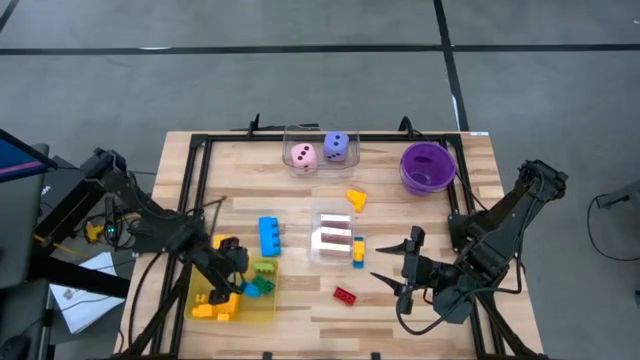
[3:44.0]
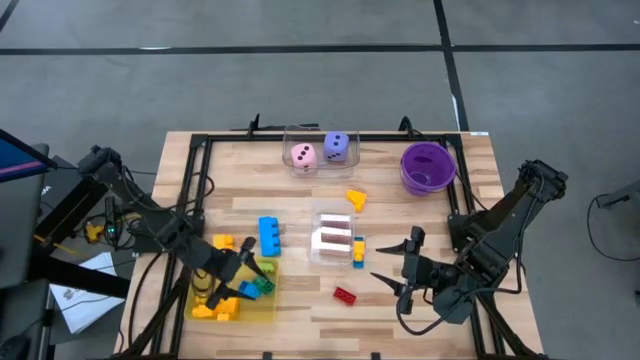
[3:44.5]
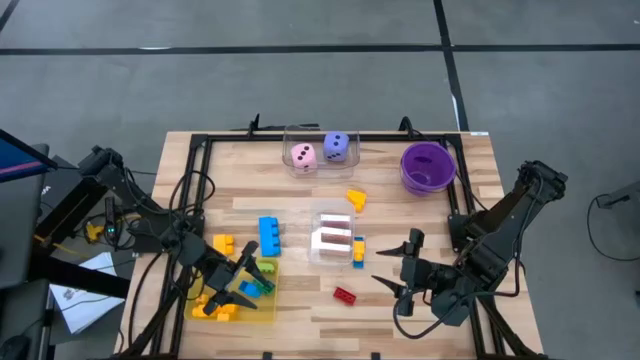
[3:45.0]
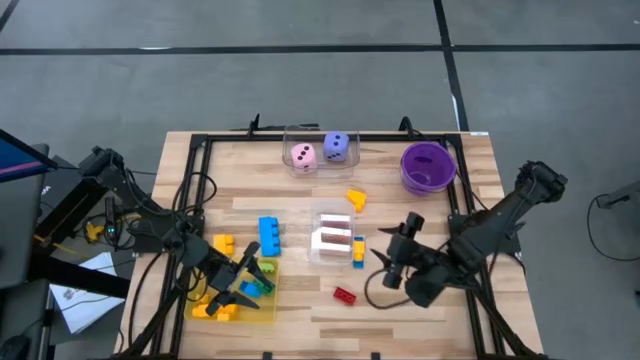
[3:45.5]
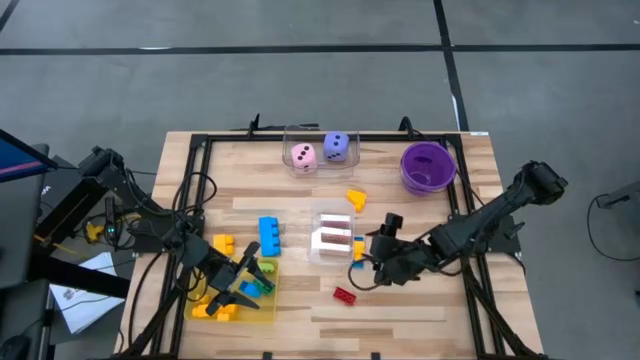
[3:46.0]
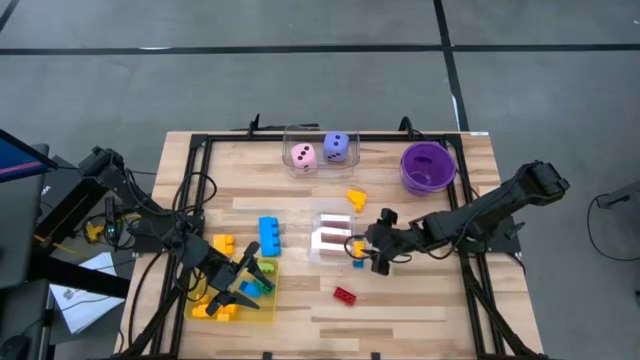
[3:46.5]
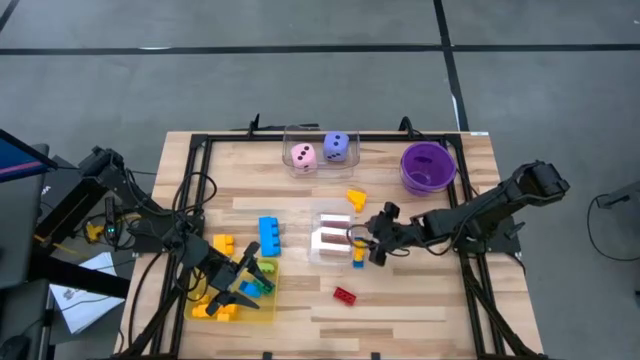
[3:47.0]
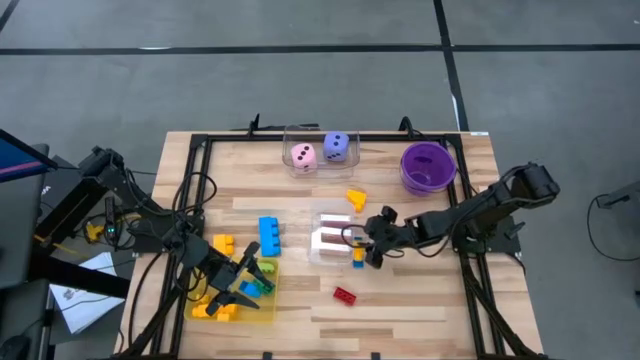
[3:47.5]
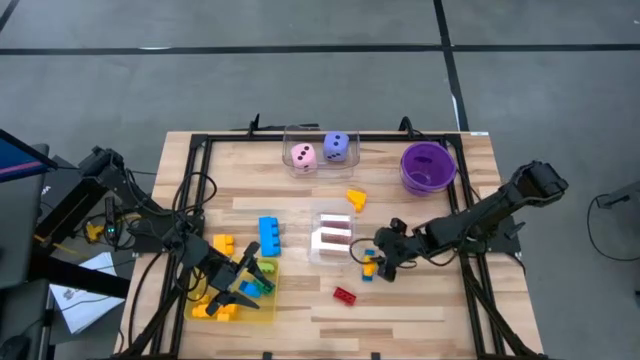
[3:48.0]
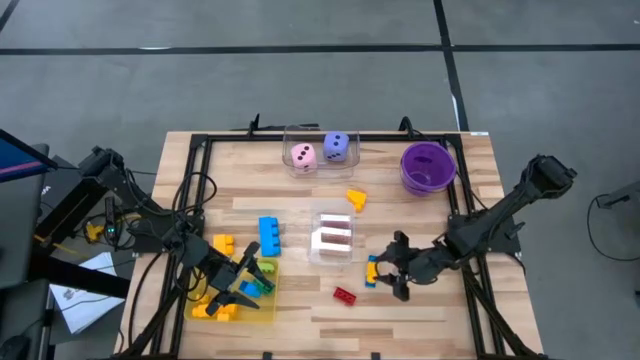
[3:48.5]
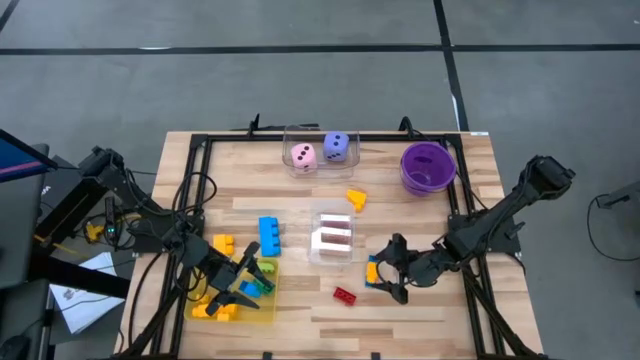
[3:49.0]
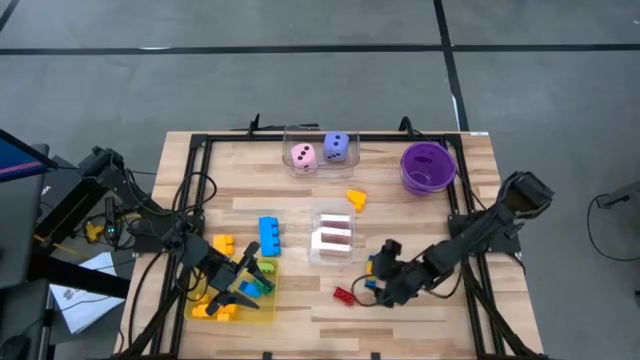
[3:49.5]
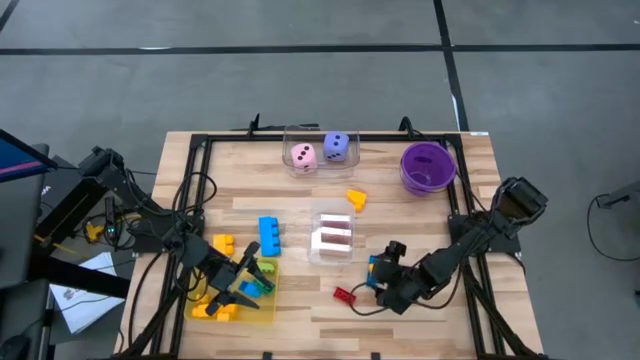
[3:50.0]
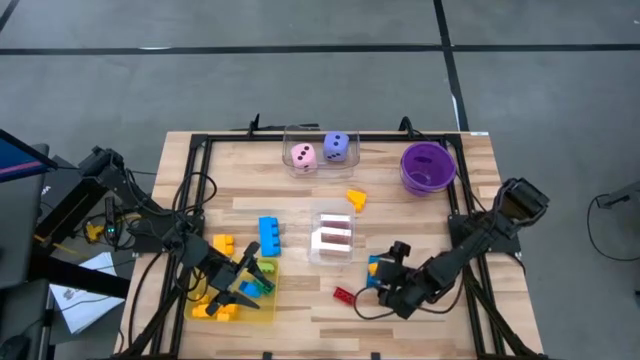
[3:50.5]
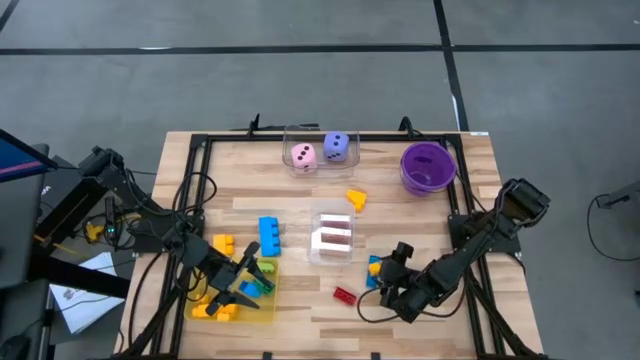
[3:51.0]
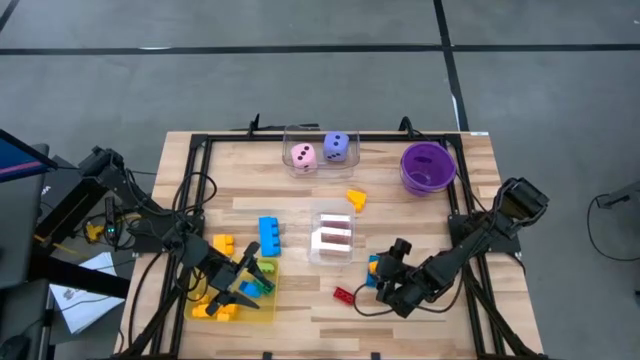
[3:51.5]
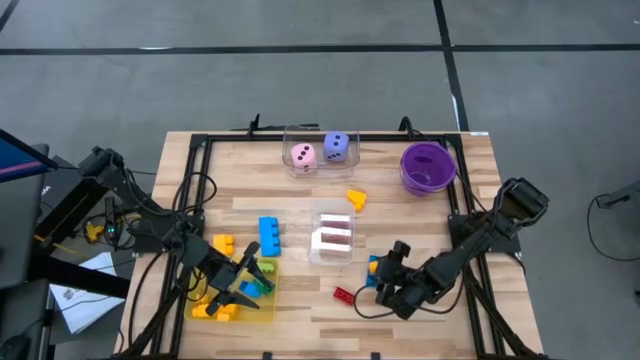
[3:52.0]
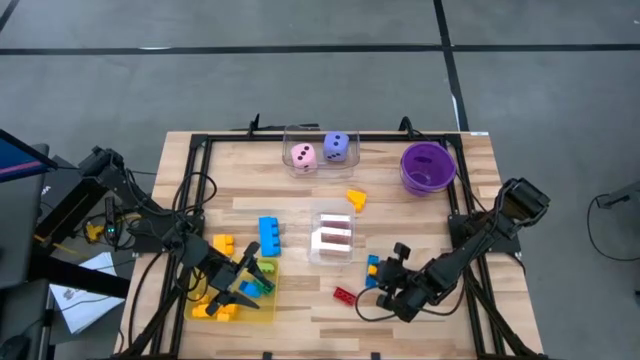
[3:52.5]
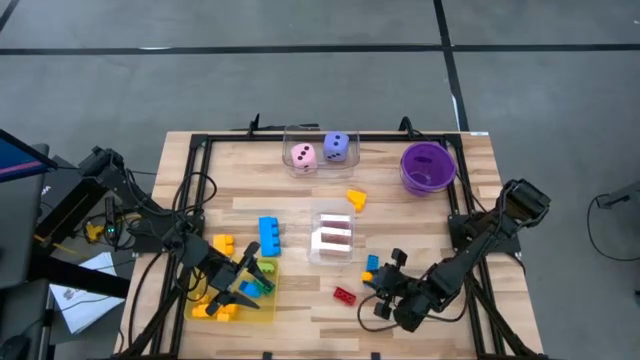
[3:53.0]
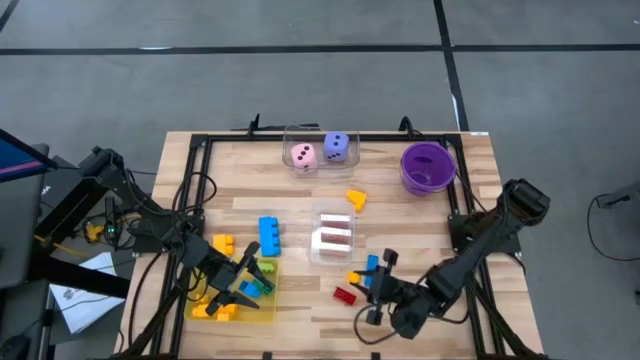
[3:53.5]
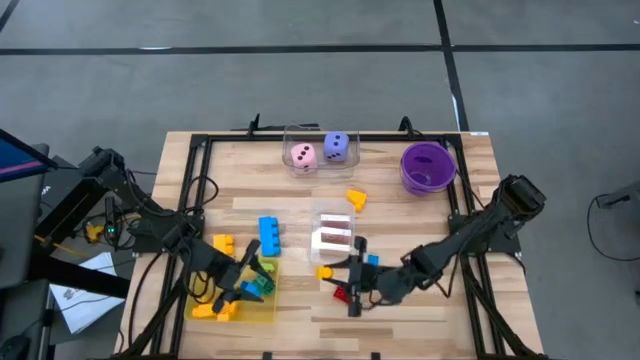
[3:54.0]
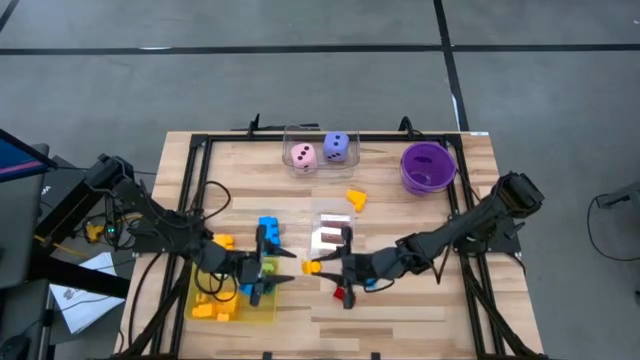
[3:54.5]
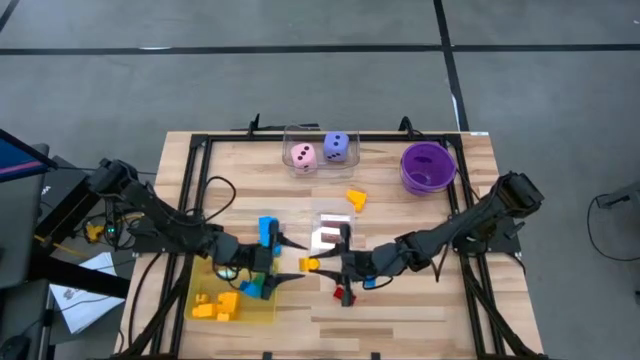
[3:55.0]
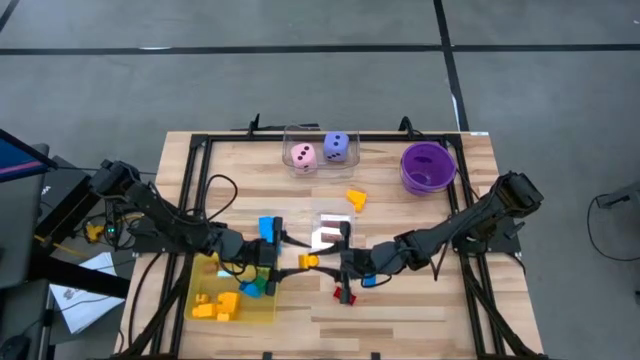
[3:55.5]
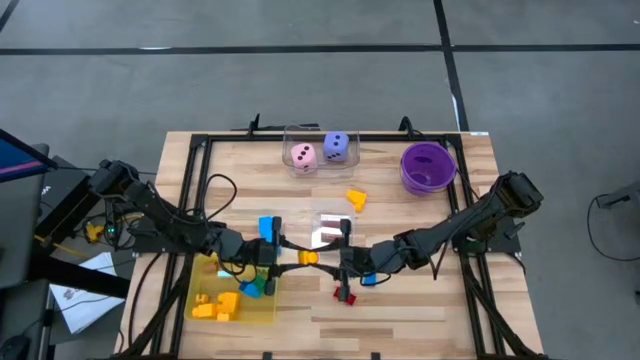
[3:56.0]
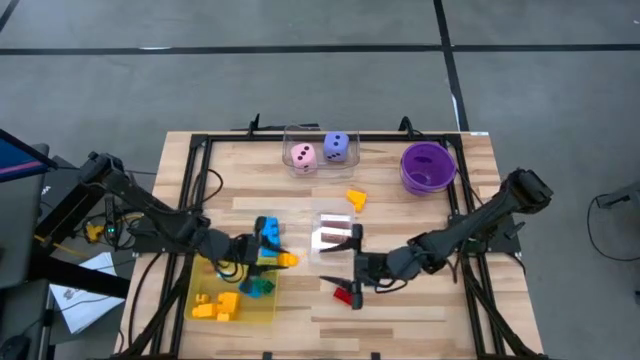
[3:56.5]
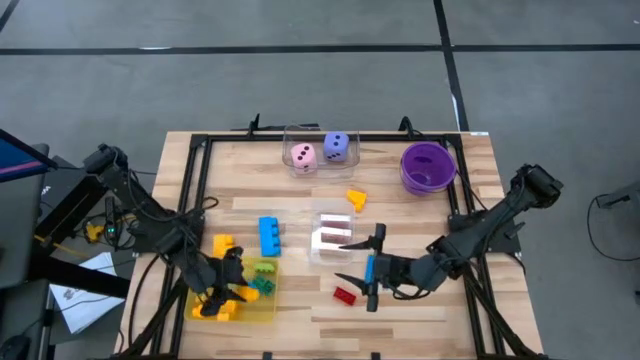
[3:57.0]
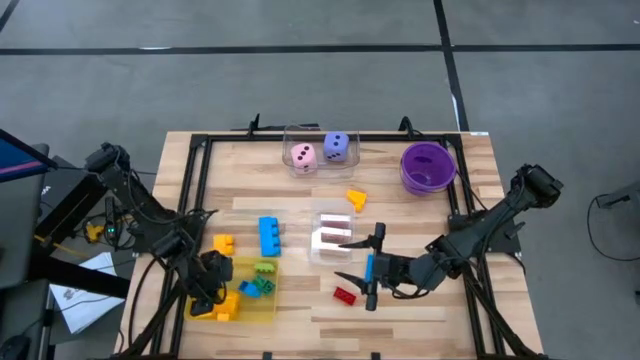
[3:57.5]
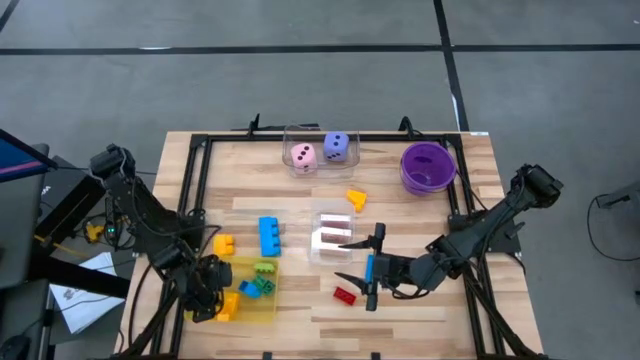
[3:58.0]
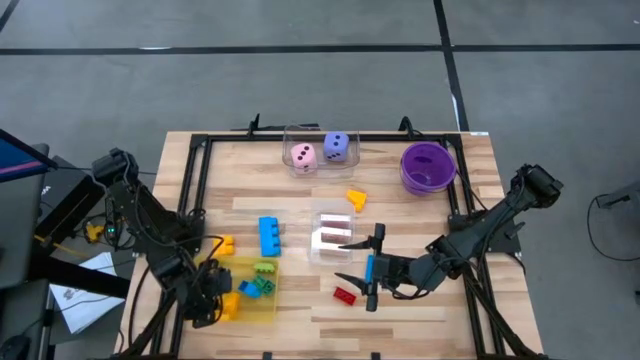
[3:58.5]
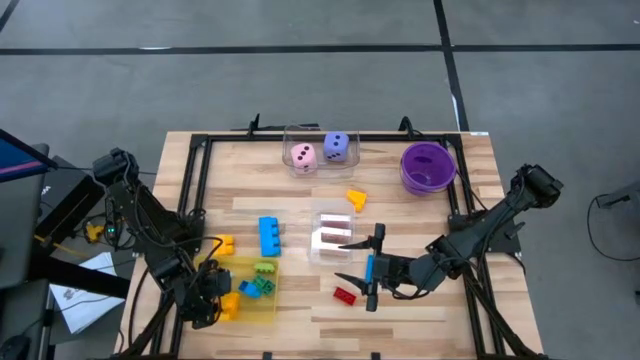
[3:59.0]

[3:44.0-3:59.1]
Task: Pick & Place Toys
Put the yellow game piece into the yellow bin

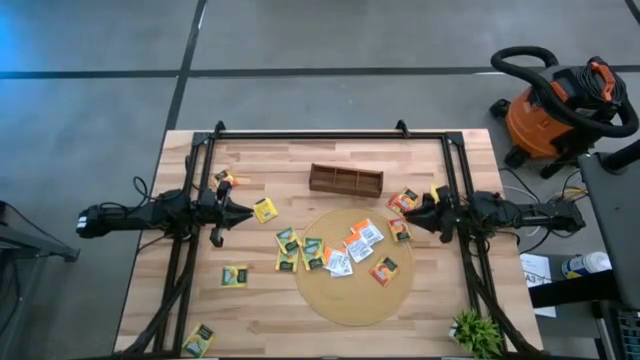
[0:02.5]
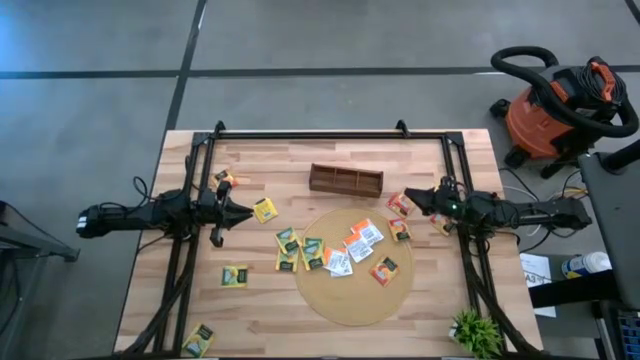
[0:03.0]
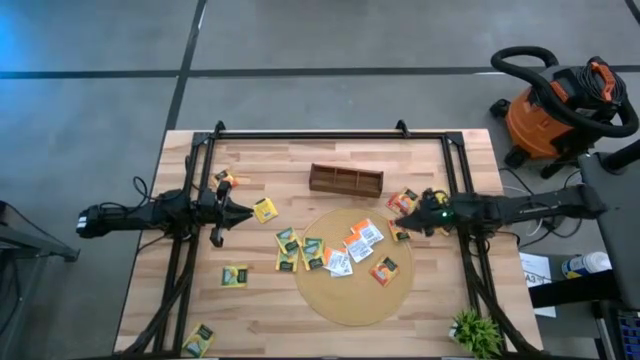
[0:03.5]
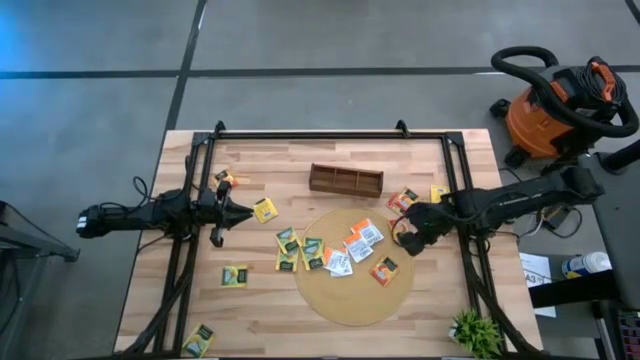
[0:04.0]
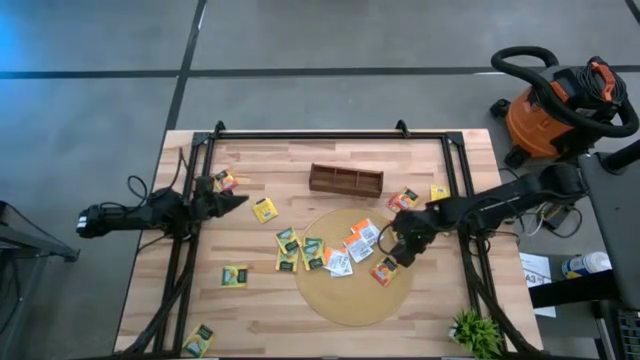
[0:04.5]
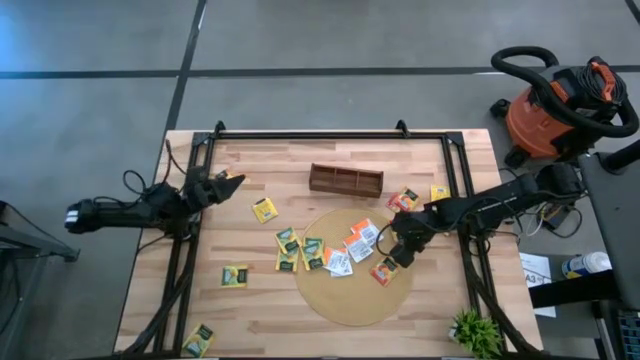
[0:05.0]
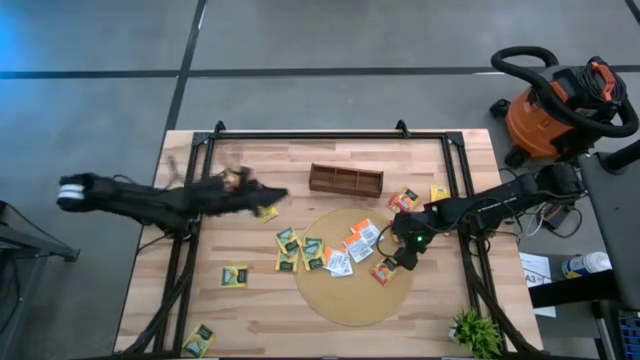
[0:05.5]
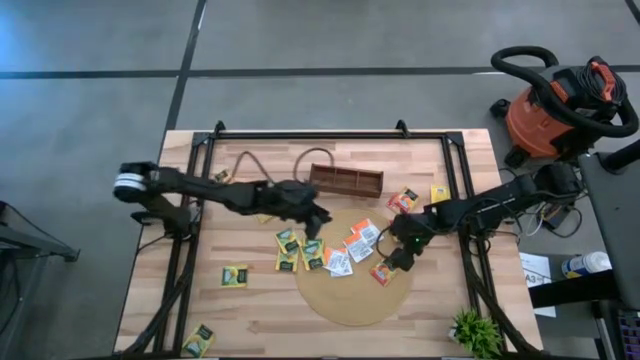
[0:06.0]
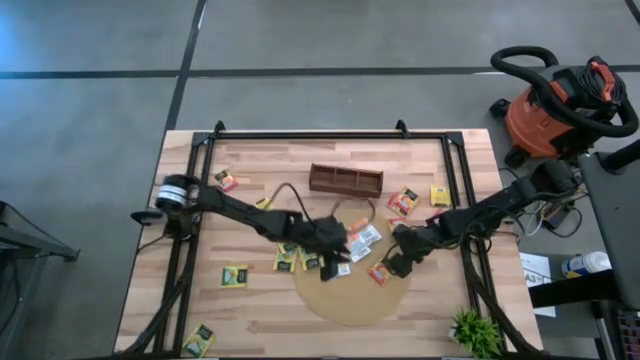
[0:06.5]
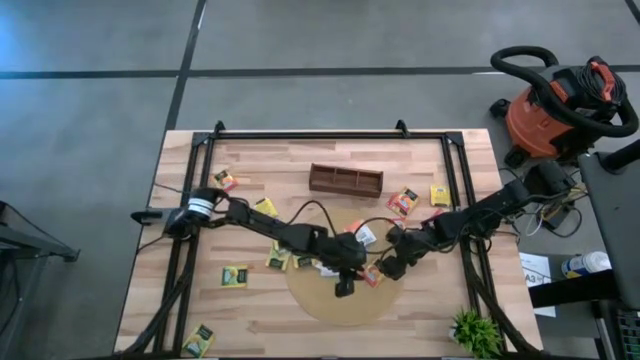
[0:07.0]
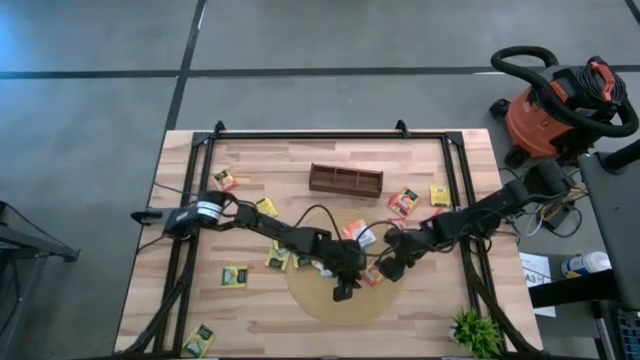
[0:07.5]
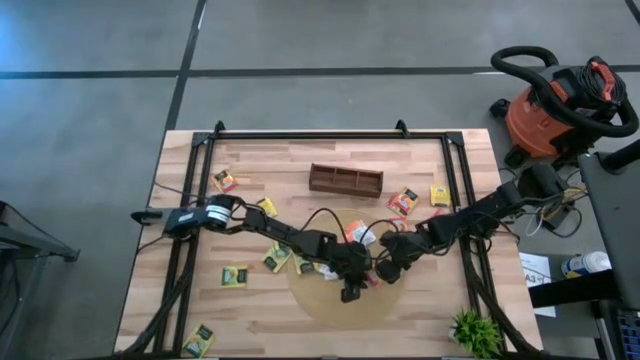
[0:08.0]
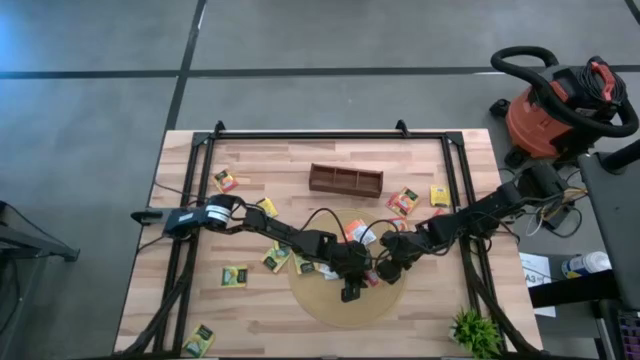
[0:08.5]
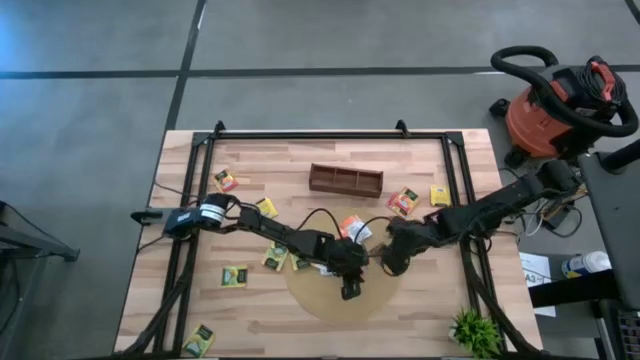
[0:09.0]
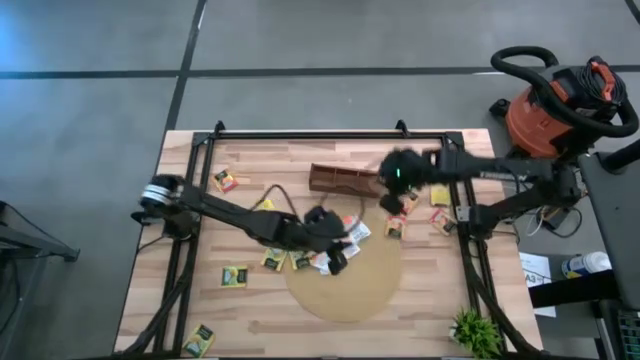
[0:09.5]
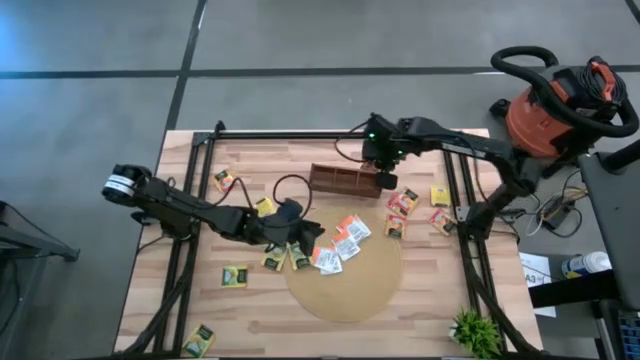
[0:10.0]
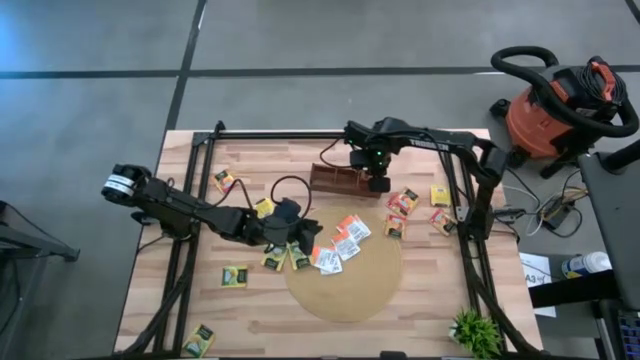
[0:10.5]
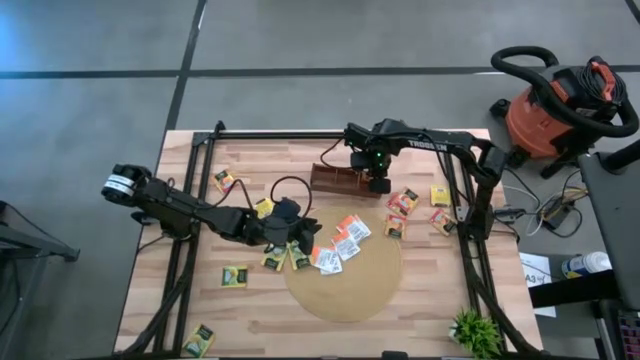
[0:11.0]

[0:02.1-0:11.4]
Task: Pick & Place Tea
Put the mango tea bag into the right section of the wooden organizer
